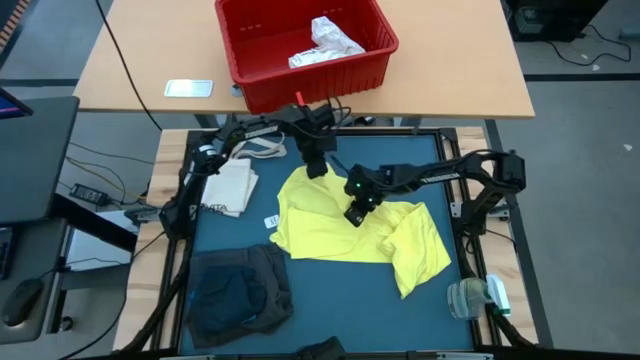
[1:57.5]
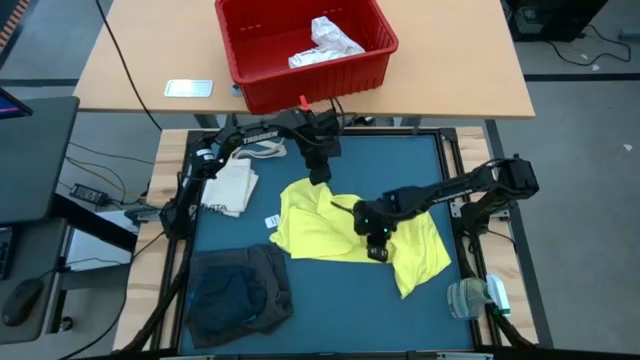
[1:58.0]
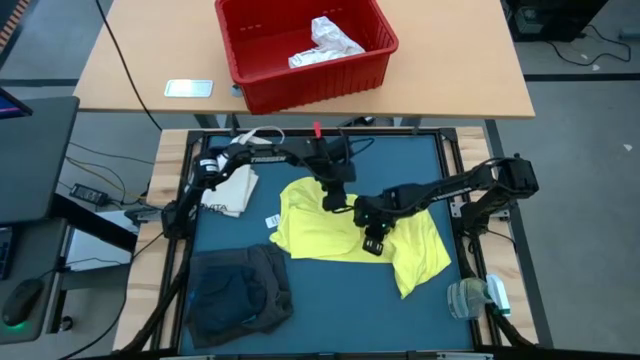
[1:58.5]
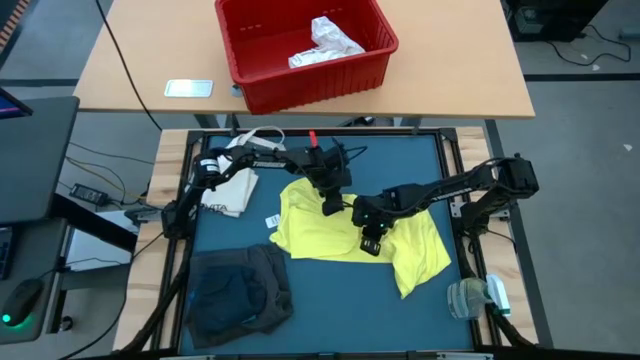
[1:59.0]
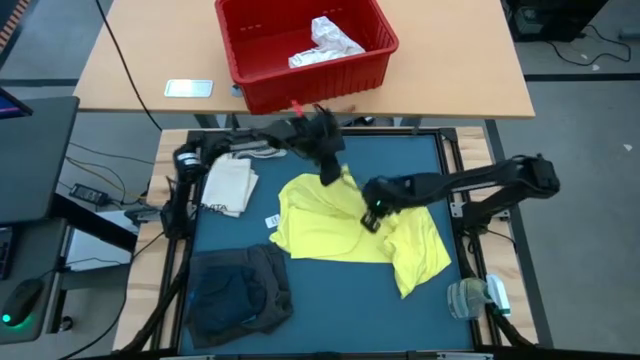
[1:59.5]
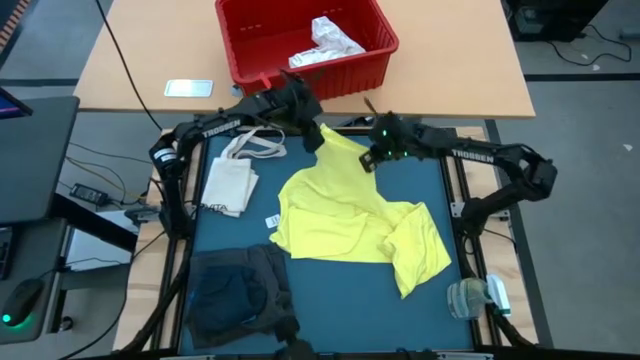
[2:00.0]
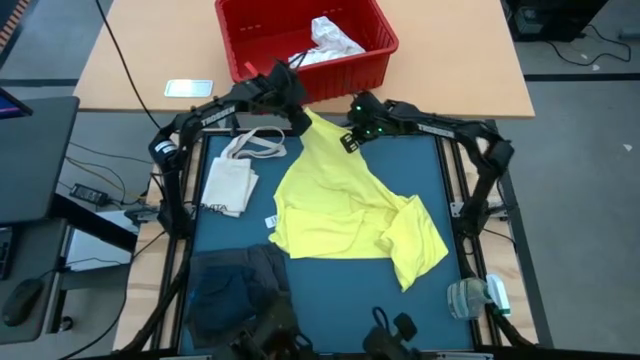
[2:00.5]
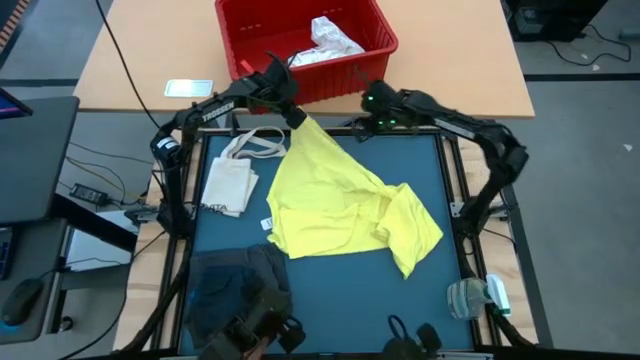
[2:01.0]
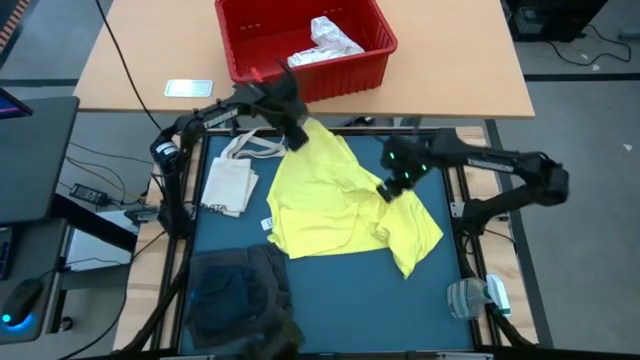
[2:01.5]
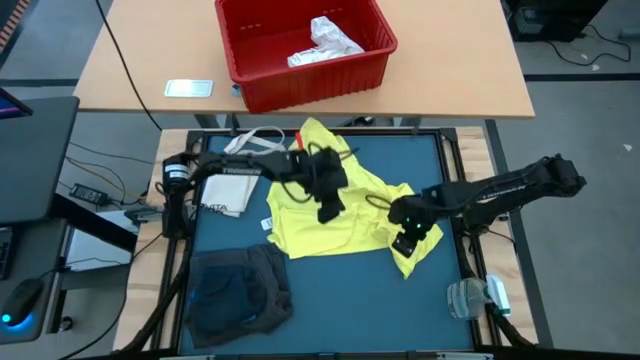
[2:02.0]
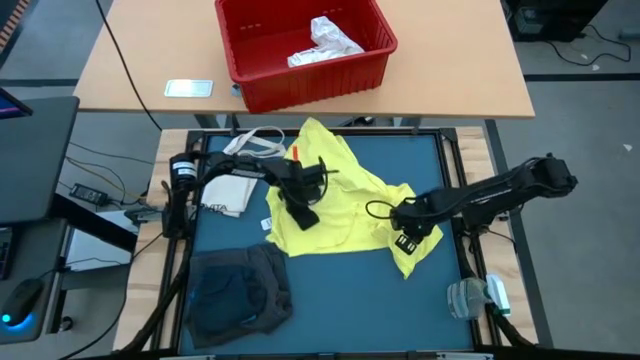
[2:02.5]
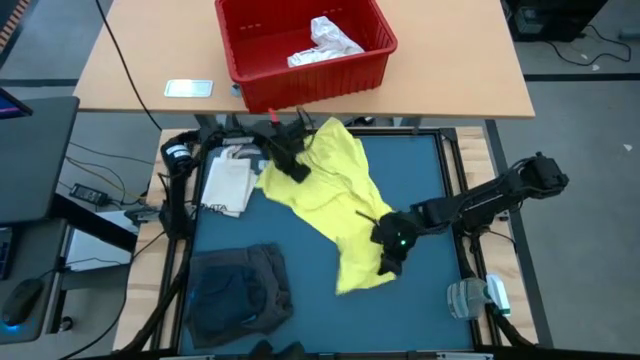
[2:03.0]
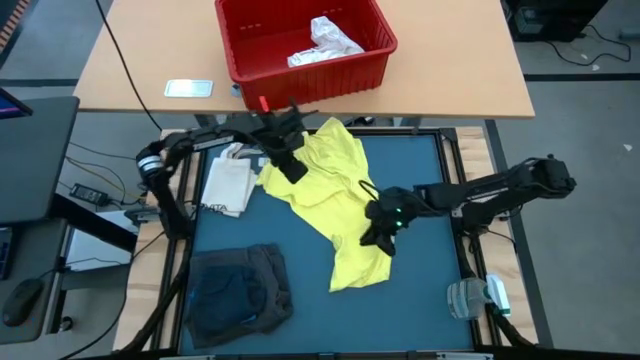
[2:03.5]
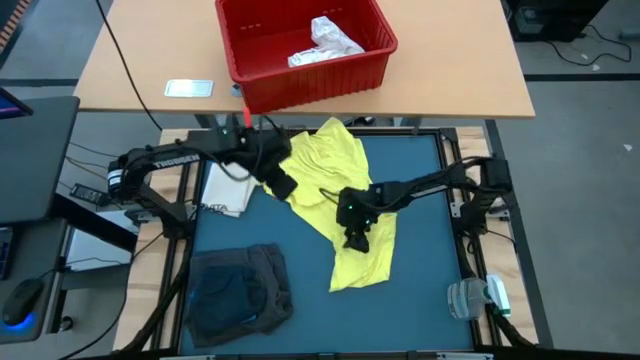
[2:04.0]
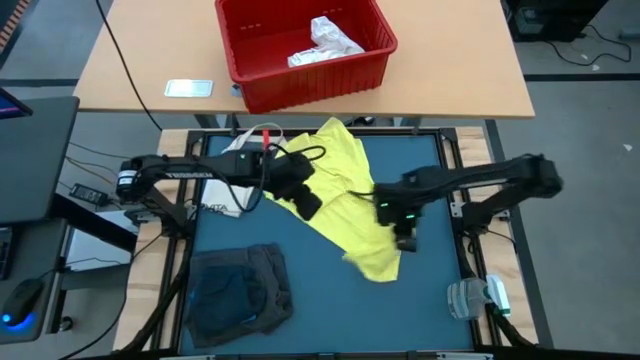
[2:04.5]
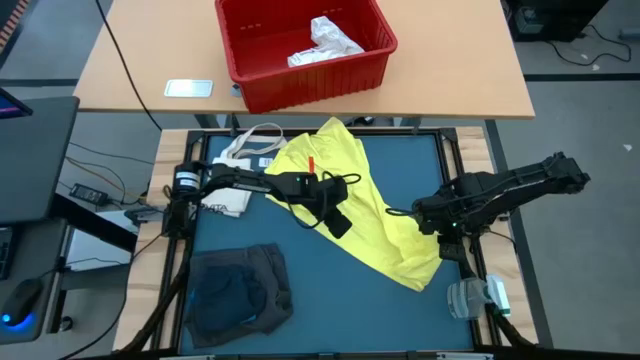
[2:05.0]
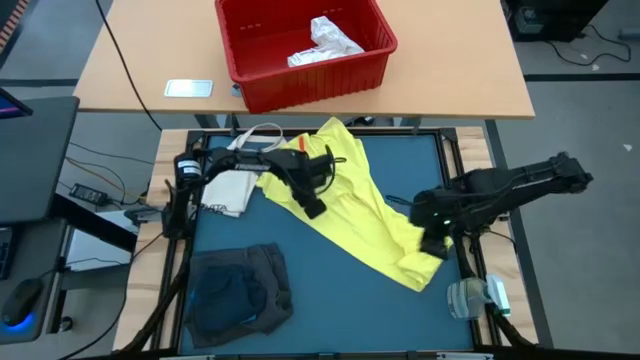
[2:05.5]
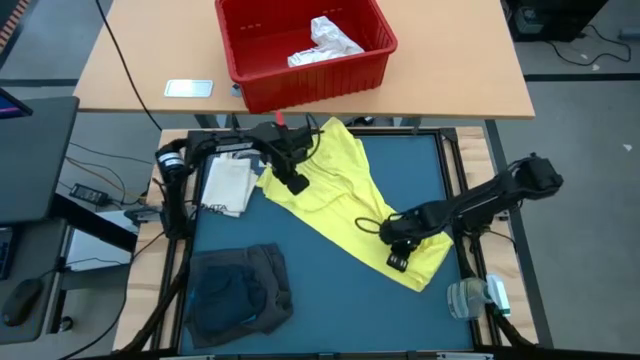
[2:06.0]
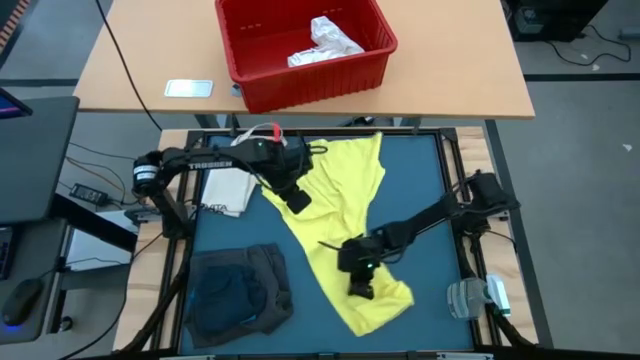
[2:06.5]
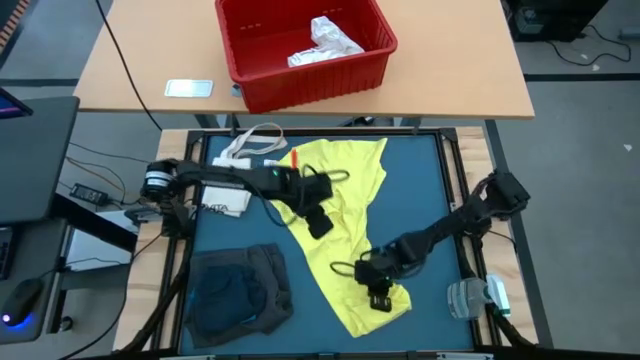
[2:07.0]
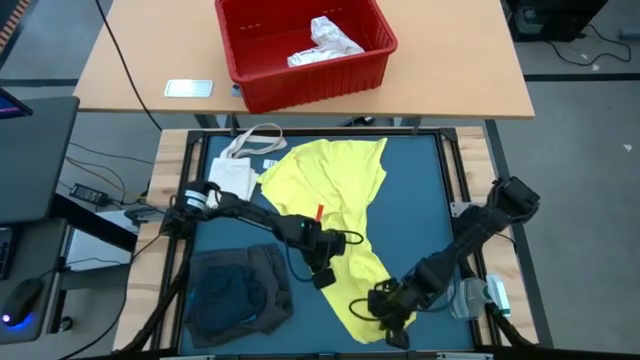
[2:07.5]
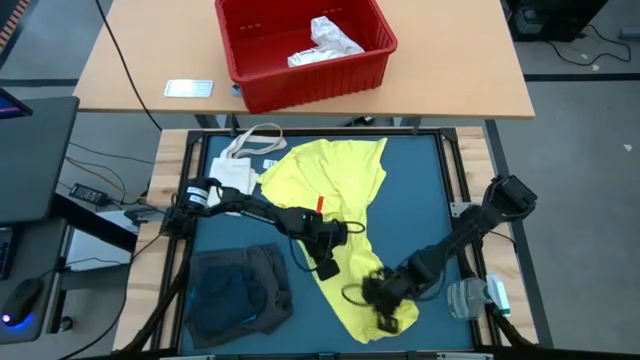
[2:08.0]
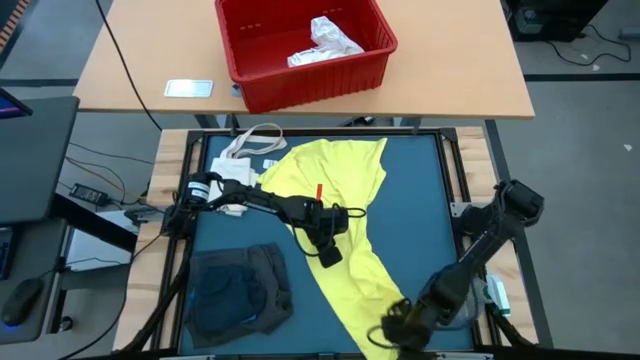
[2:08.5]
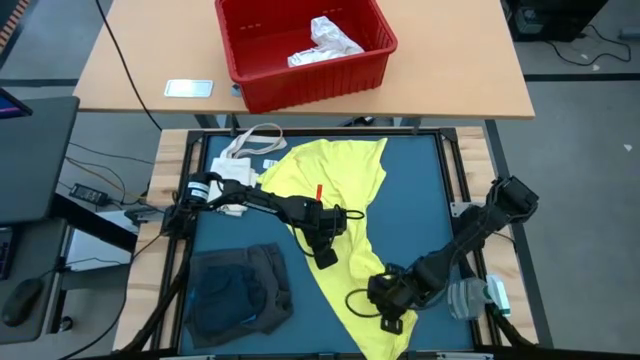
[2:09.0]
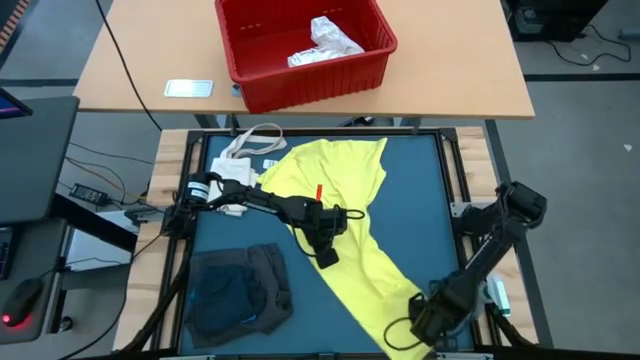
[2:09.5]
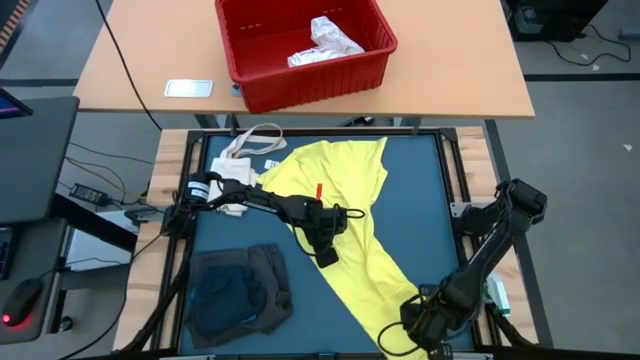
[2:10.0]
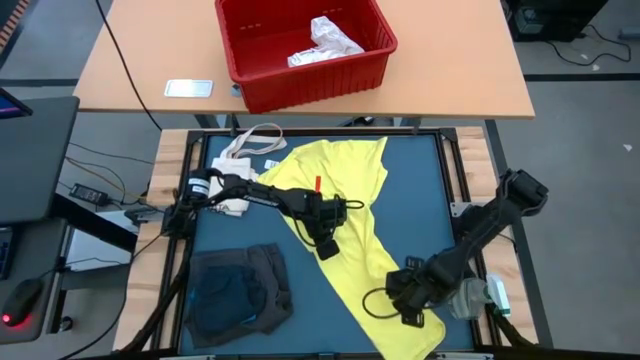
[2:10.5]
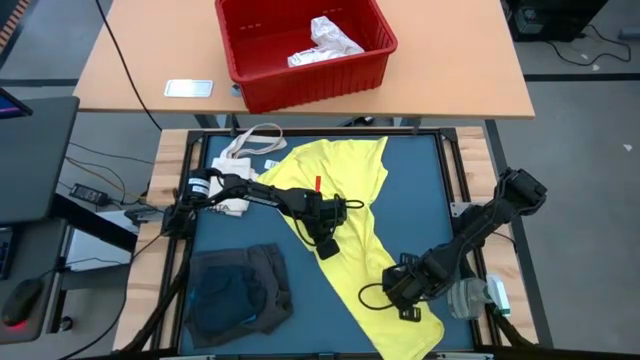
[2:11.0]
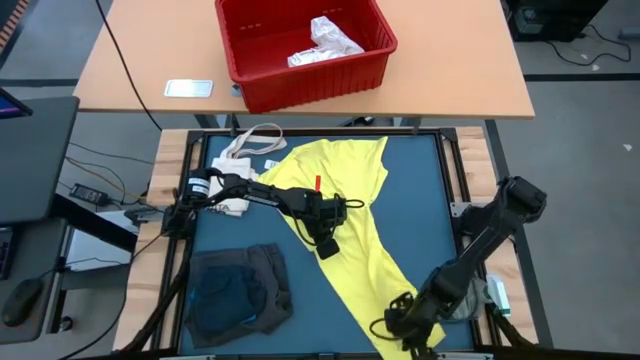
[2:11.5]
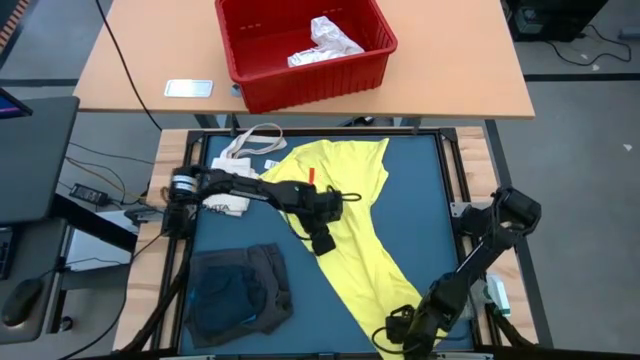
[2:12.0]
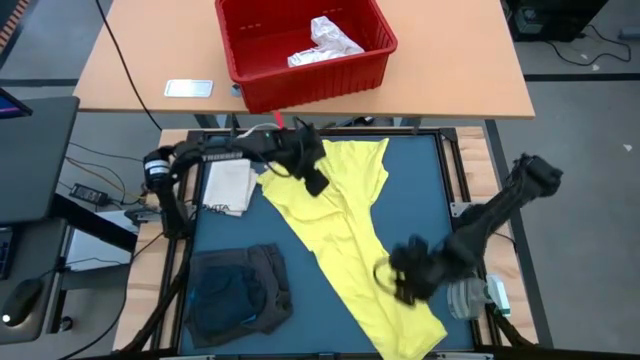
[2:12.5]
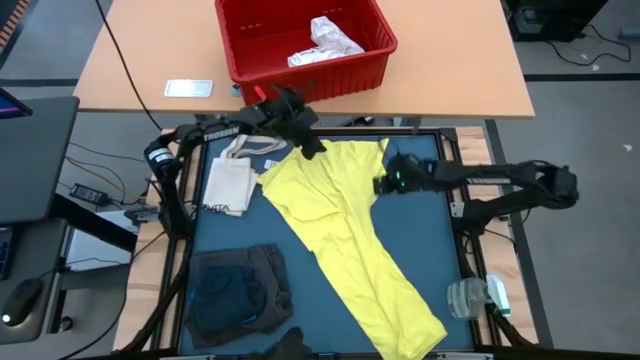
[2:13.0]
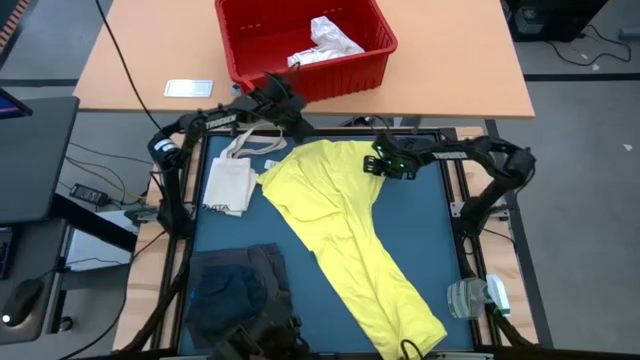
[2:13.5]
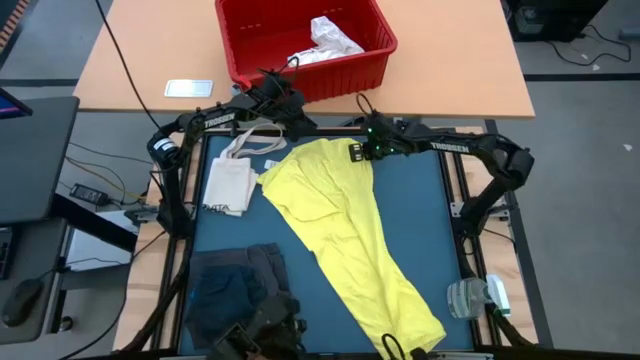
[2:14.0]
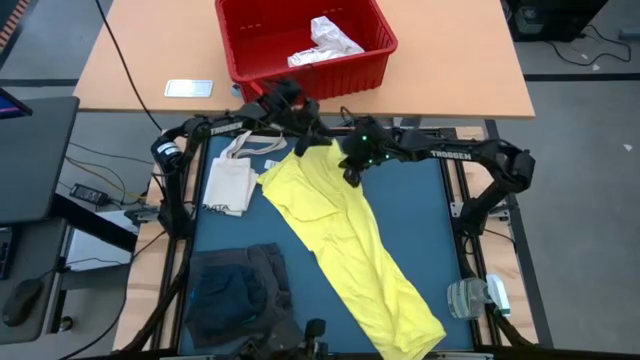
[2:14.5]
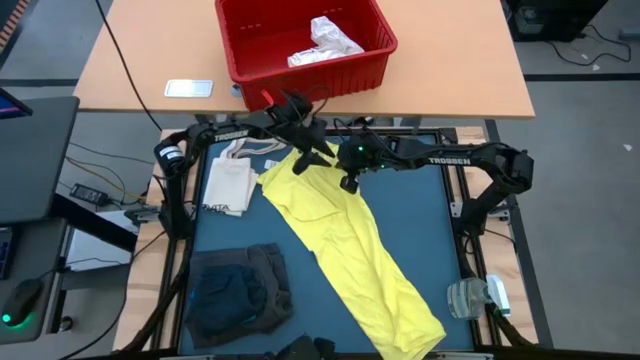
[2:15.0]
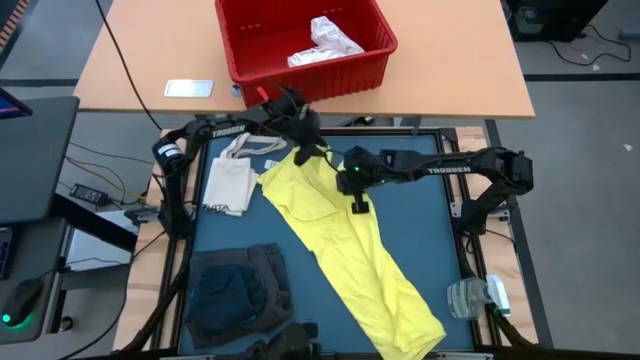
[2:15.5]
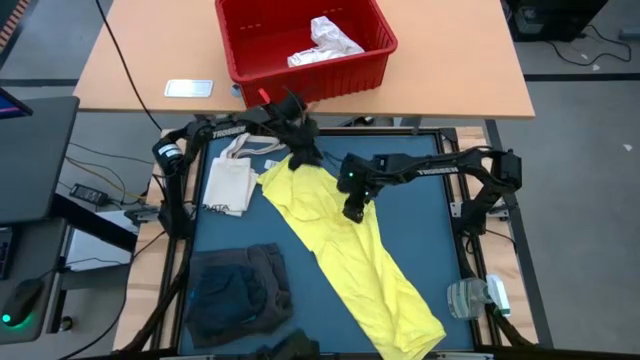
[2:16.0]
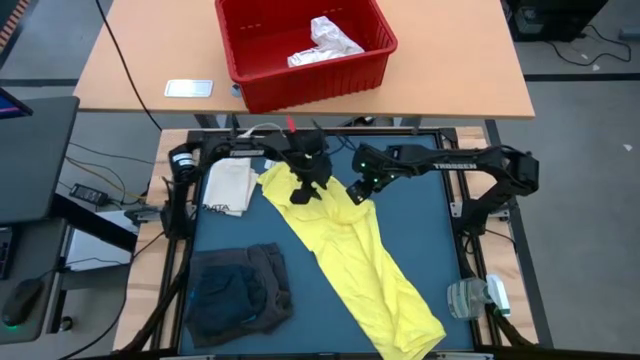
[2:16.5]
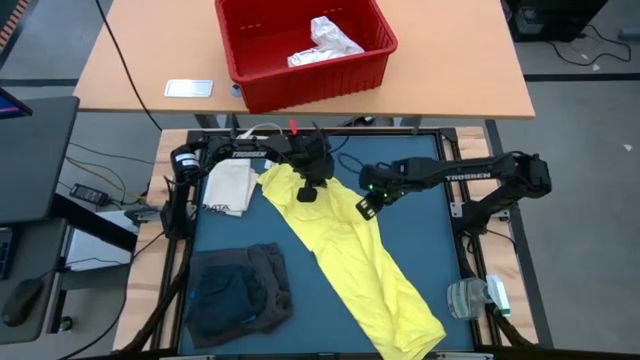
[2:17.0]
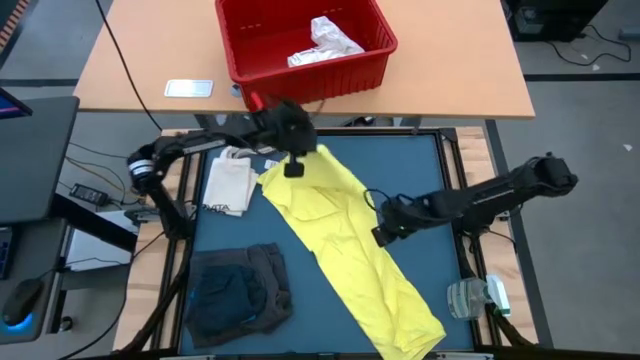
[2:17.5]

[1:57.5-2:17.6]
Task: Fold laundry
Fold the yellow shirt

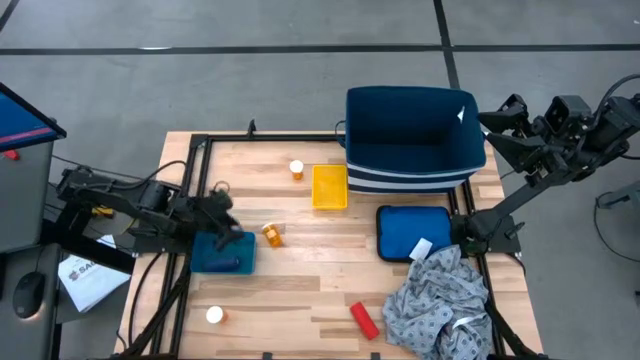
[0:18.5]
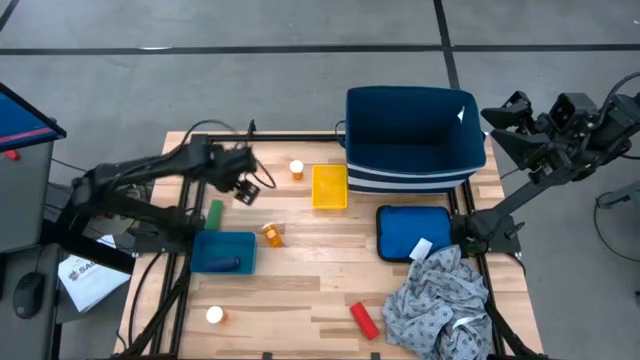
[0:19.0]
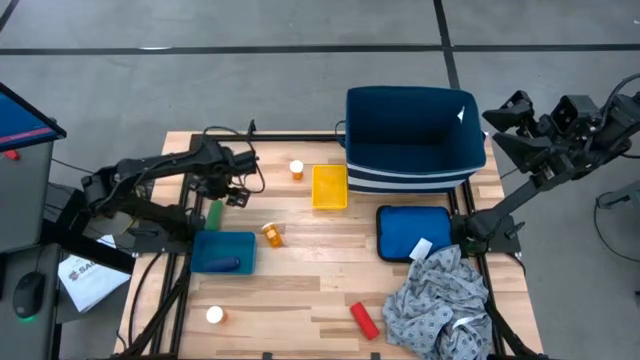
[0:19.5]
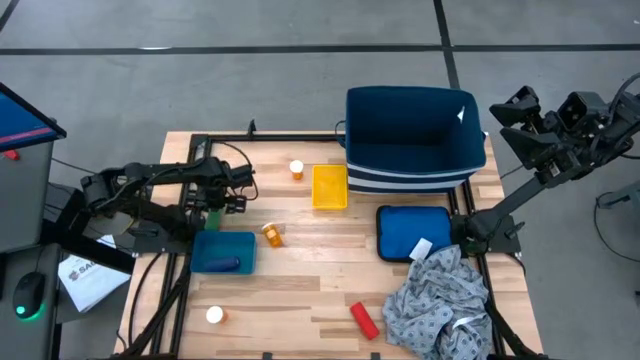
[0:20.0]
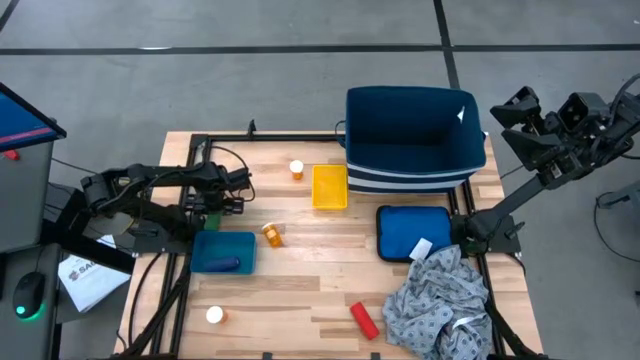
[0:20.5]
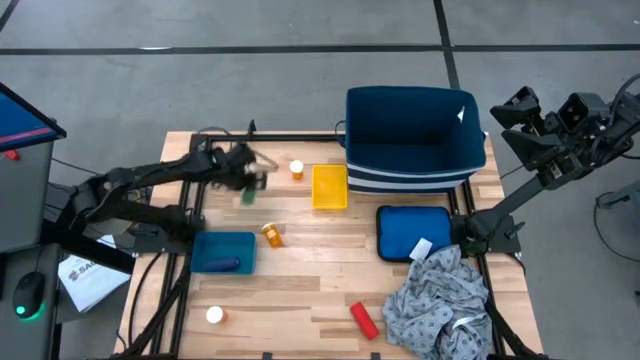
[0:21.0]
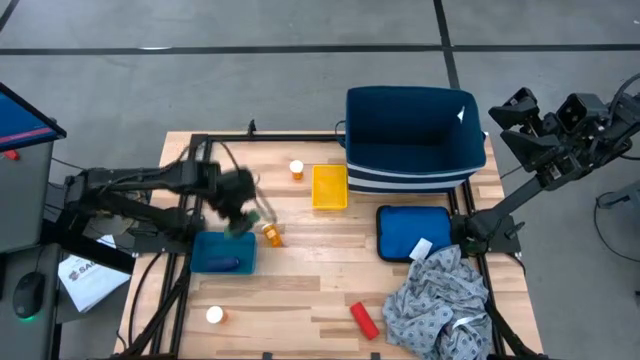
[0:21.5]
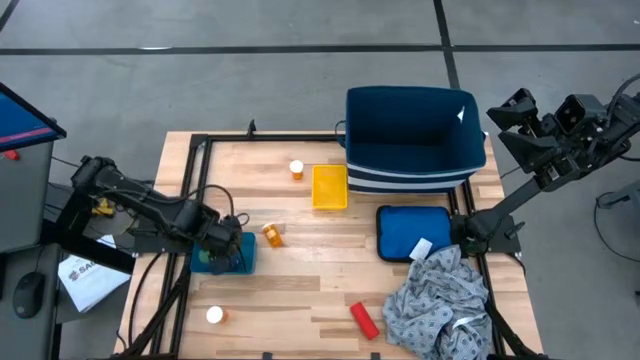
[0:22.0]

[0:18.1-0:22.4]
Task: Pick & place medical supplies in basket/bin
Put the green bandage into the blue bin
